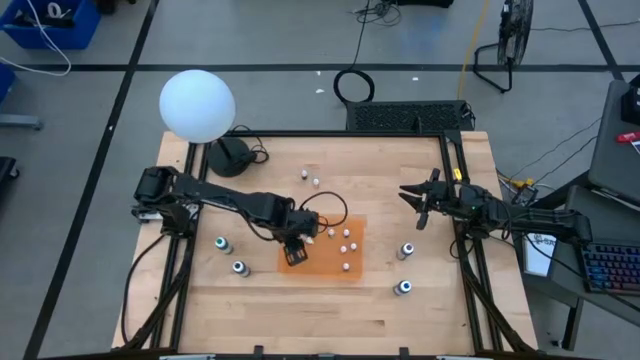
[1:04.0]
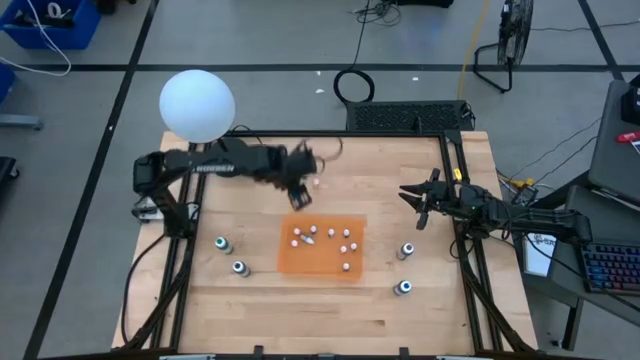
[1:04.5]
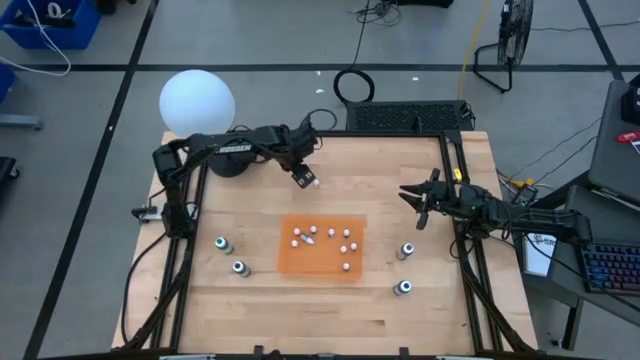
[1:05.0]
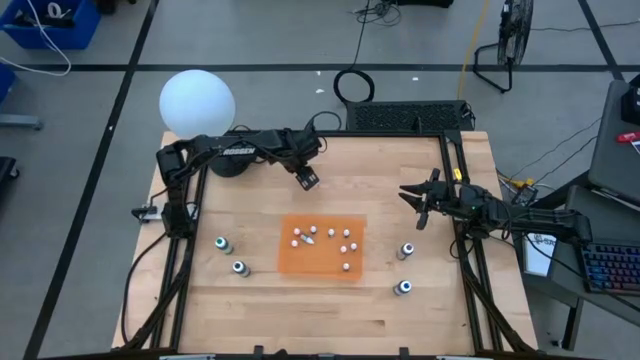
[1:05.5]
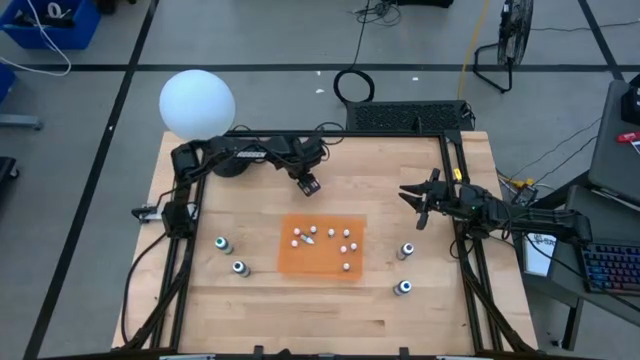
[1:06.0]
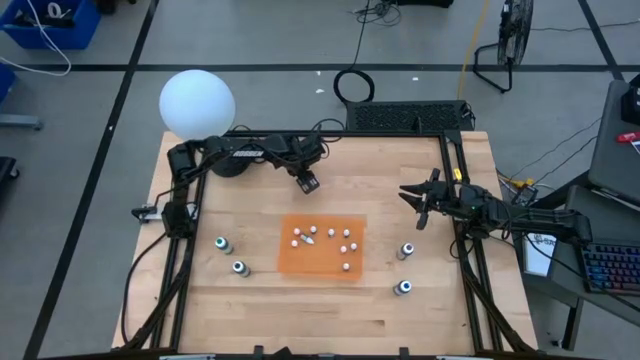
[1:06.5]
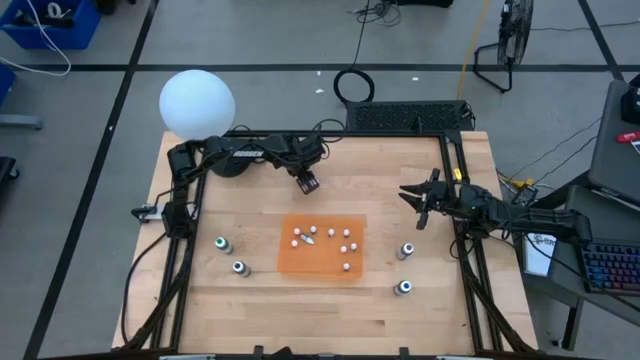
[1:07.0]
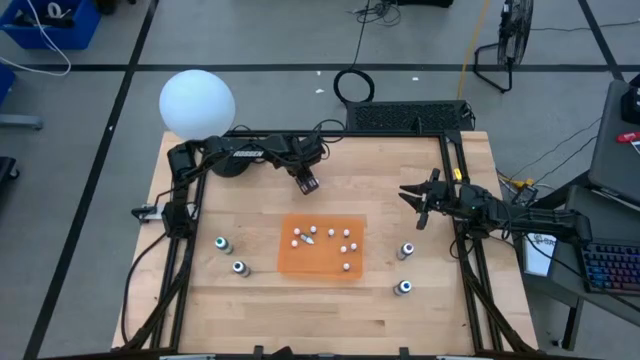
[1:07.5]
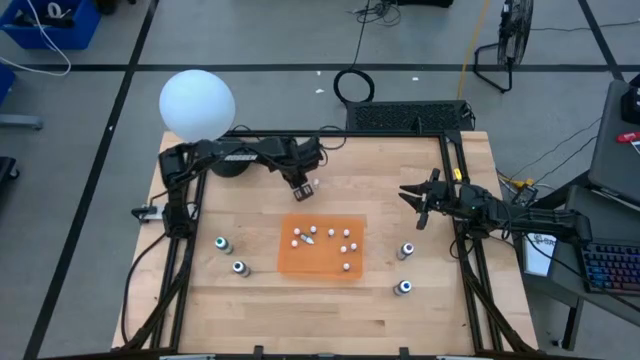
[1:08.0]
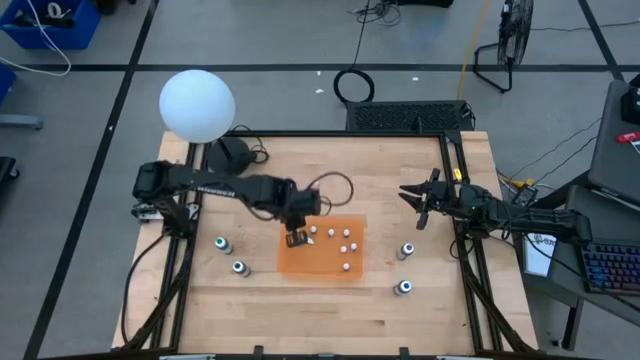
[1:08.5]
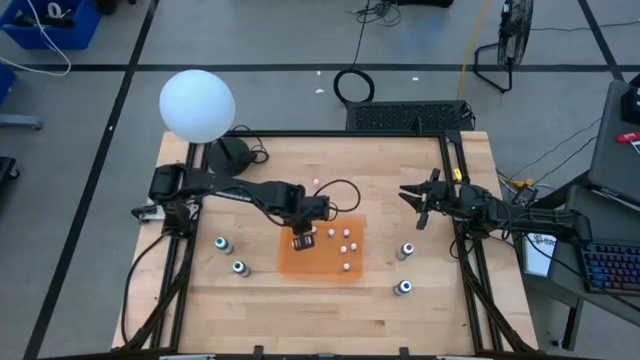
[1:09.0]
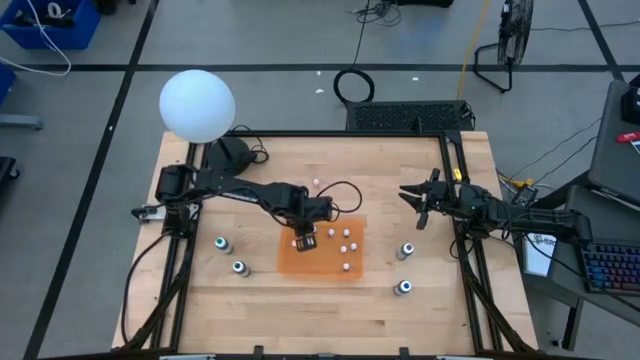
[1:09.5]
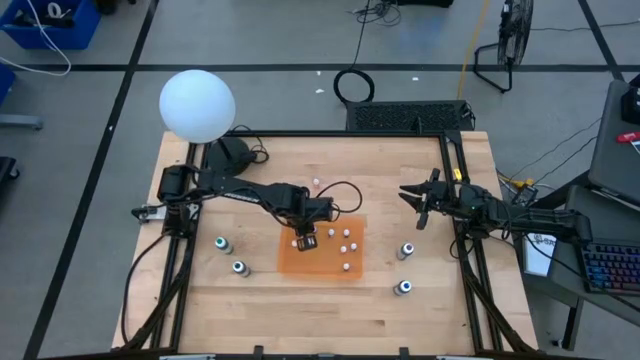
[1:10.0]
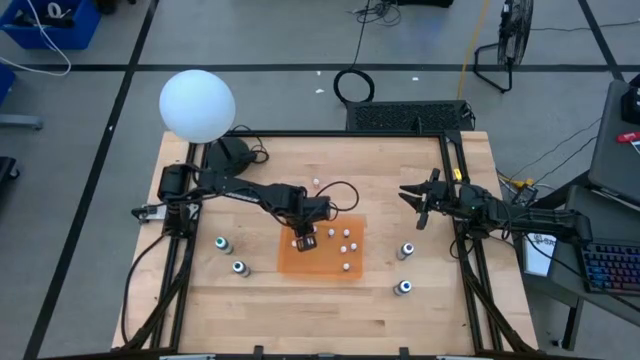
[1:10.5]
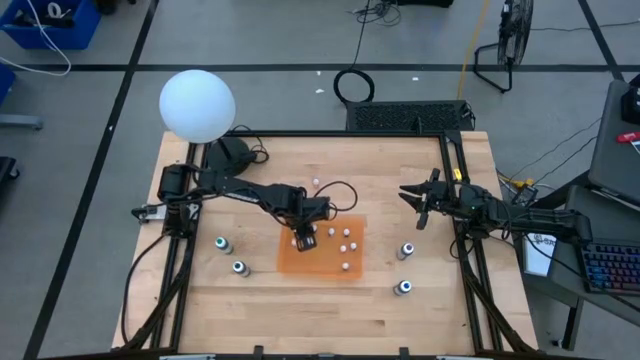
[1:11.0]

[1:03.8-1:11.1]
Task: Pick & Place food coloring
Put the purple food coloring bottle into the orange bin

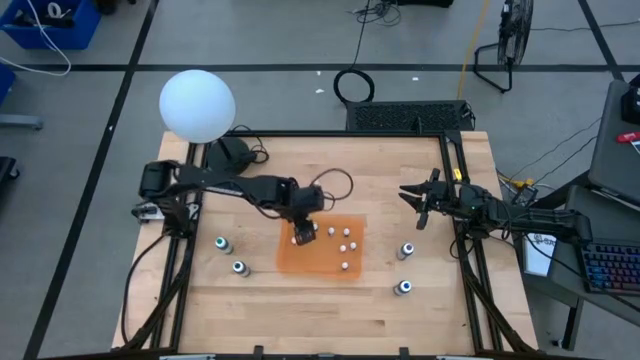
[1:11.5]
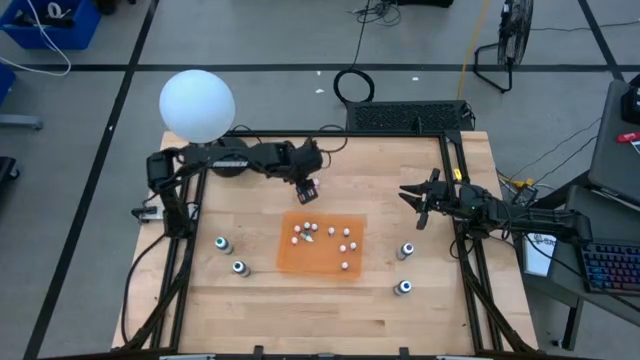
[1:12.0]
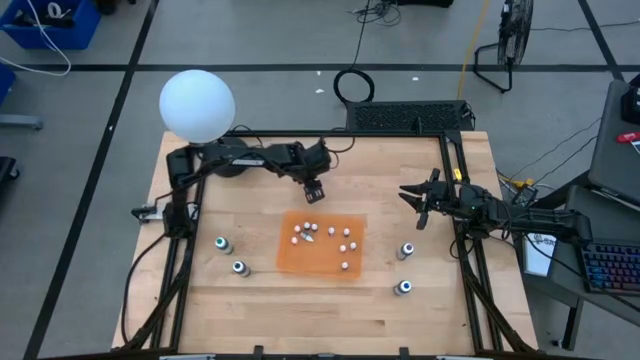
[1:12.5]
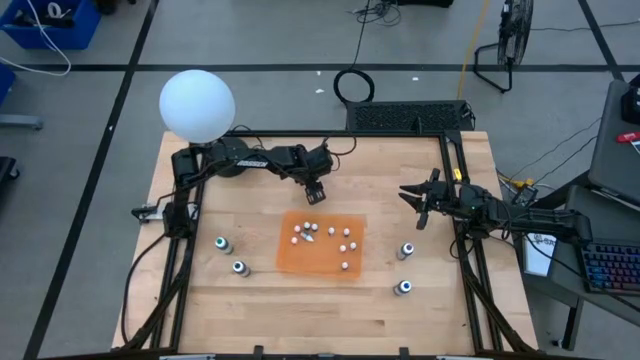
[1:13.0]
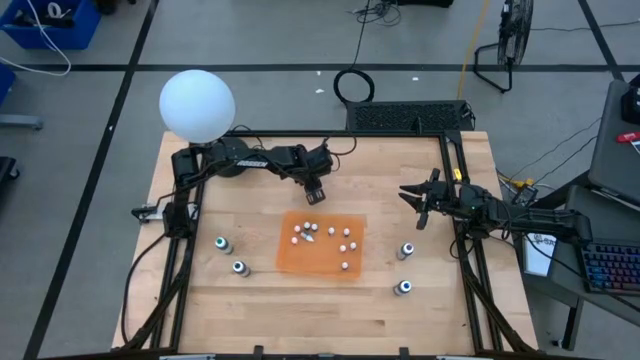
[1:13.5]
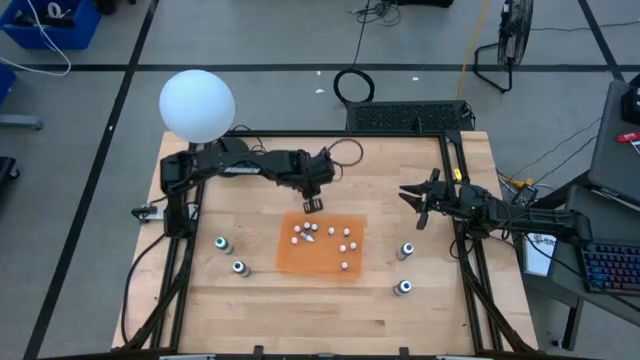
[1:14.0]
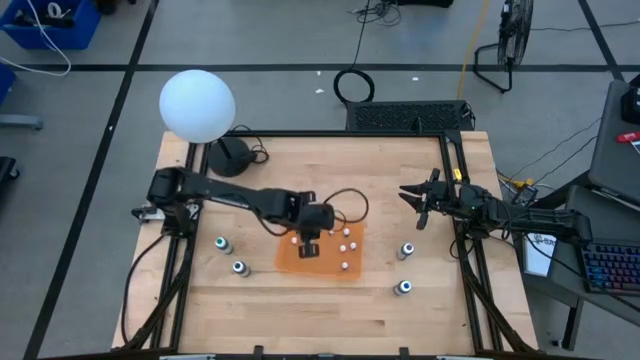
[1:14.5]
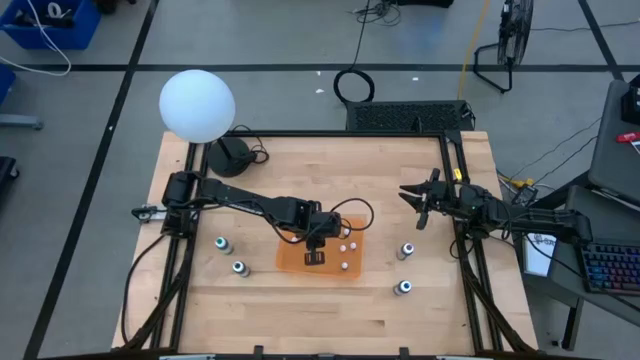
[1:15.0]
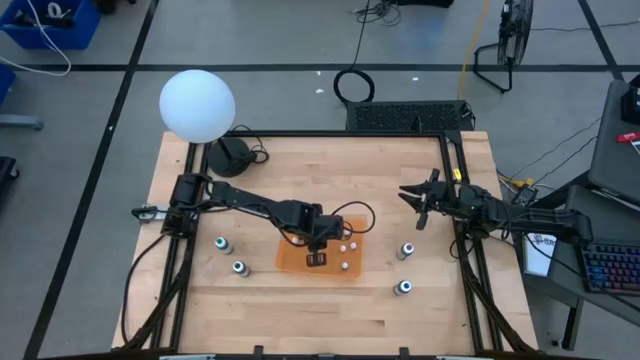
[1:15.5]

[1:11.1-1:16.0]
Put the orange food coloring bottle into the orange bin

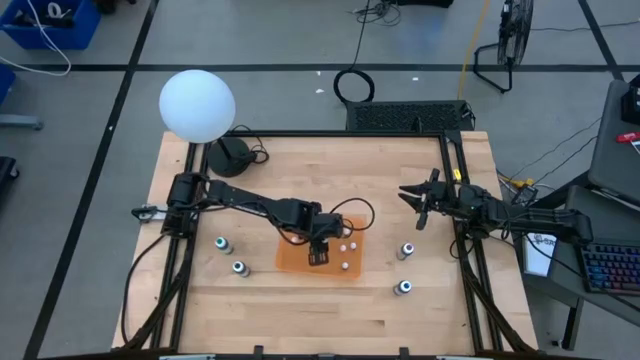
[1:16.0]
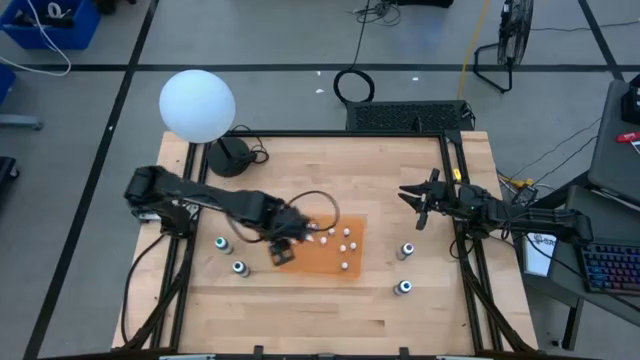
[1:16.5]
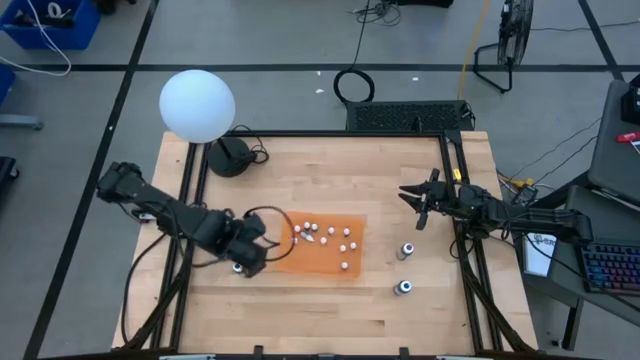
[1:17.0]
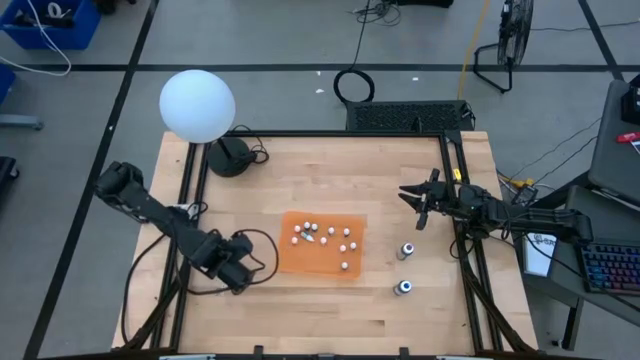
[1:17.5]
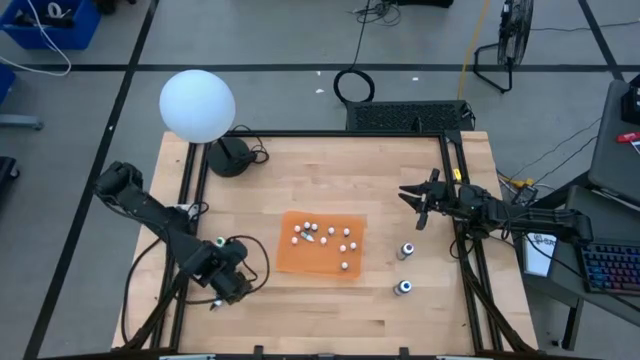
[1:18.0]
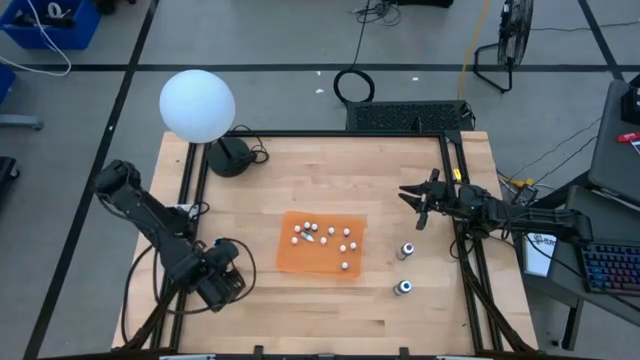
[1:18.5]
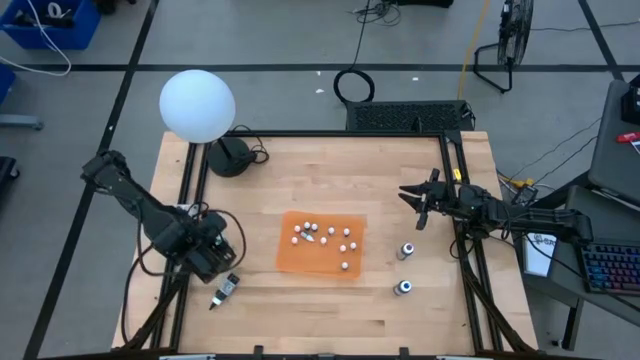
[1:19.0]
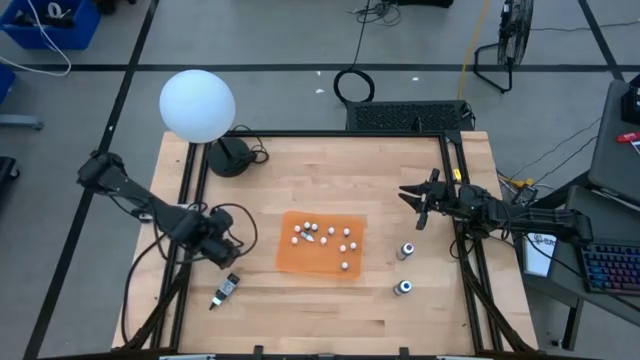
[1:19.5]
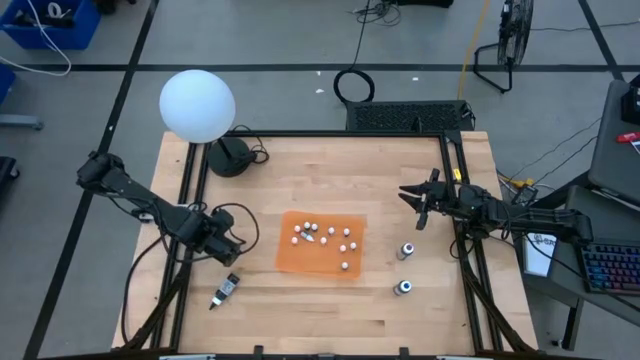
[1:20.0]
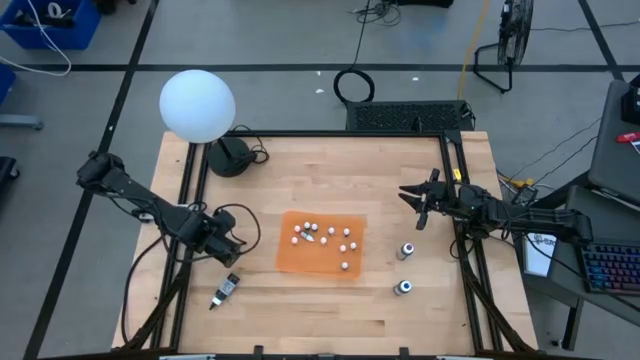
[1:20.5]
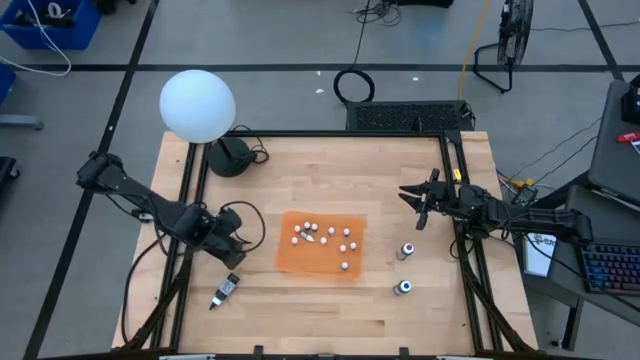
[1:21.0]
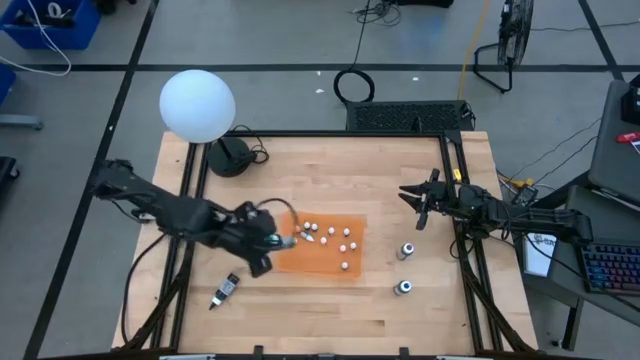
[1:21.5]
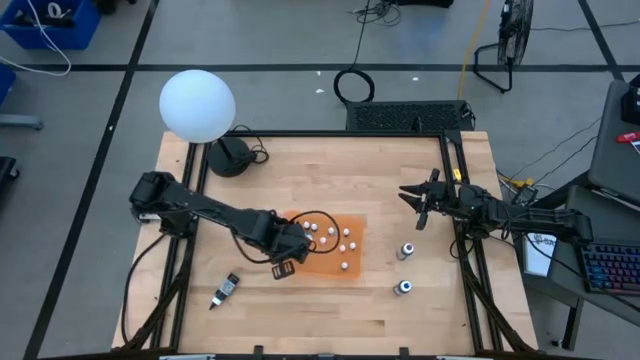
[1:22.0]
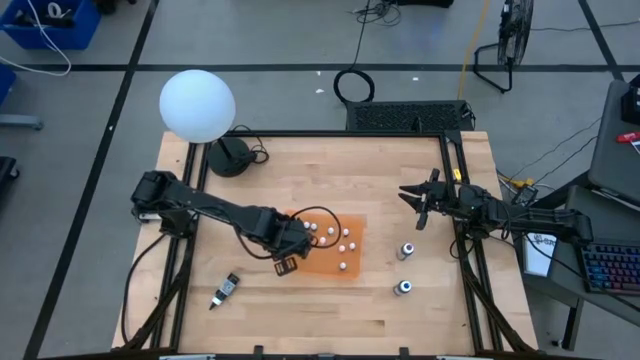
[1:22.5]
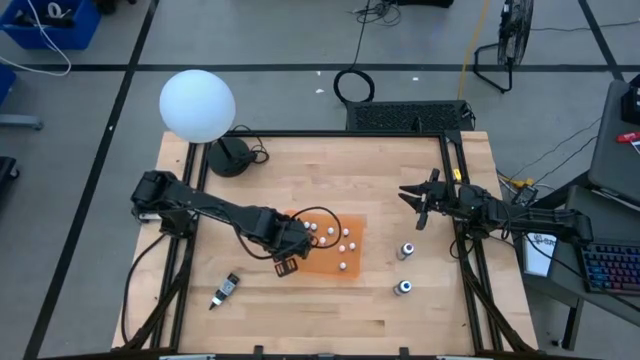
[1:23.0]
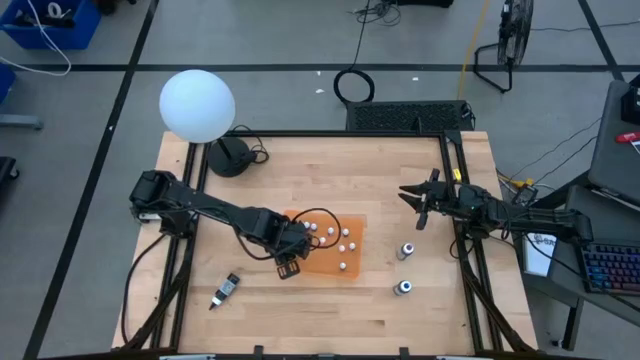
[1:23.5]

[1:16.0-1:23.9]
Put the large green food coloring bottle into the orange bin
